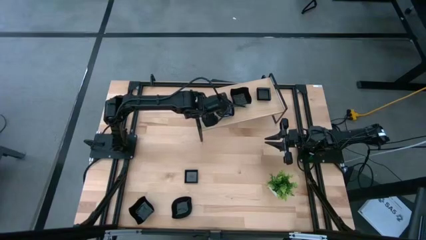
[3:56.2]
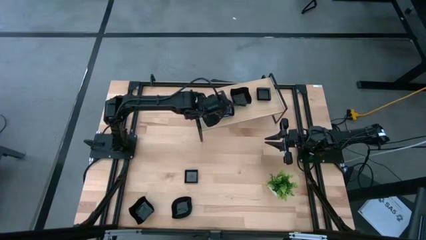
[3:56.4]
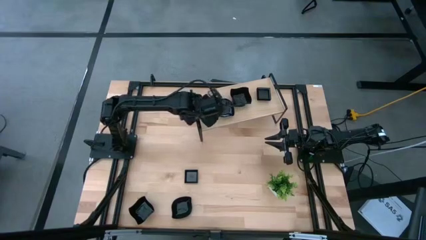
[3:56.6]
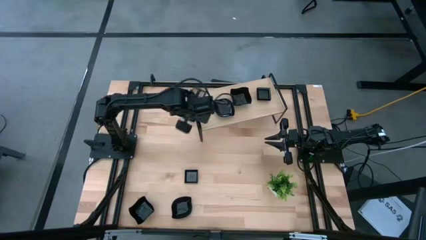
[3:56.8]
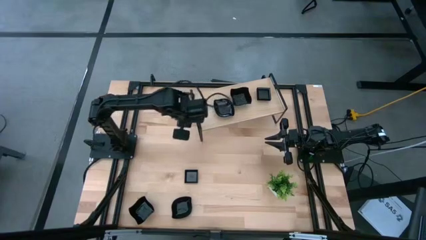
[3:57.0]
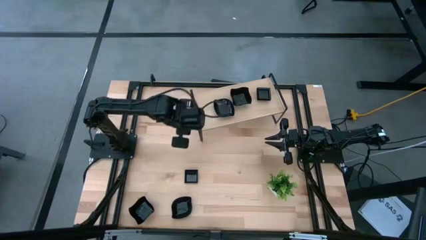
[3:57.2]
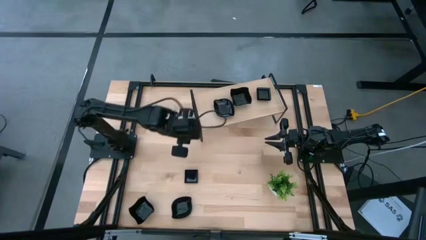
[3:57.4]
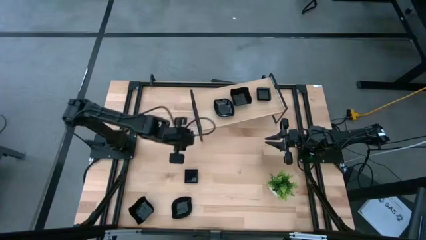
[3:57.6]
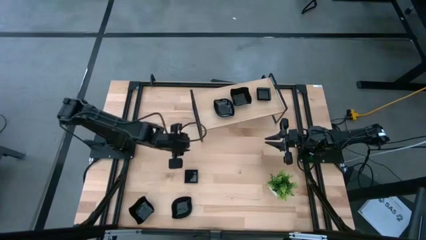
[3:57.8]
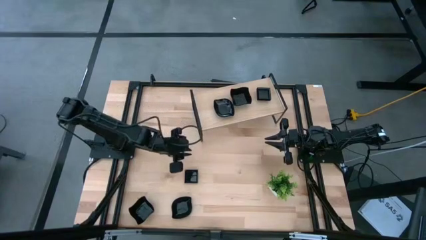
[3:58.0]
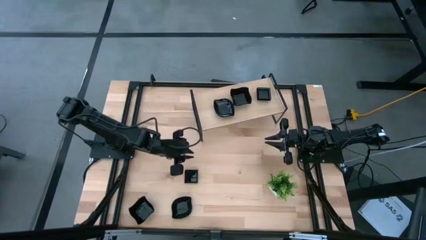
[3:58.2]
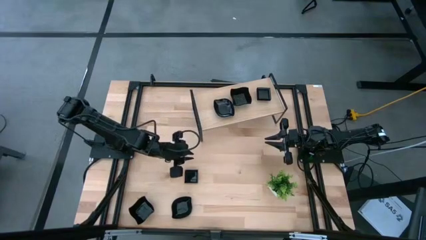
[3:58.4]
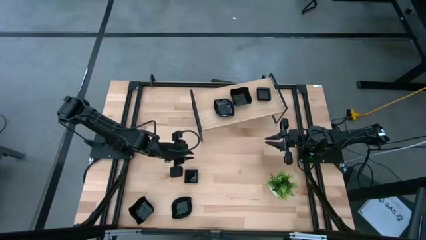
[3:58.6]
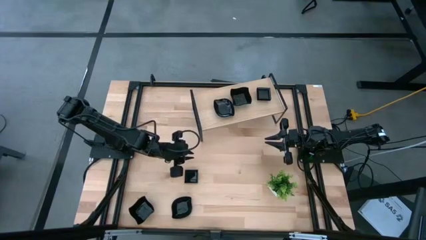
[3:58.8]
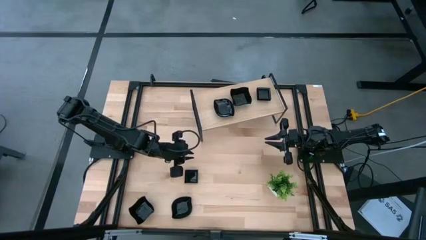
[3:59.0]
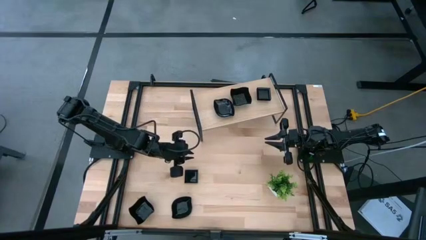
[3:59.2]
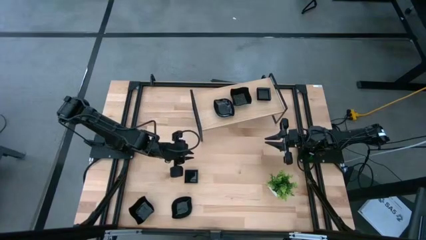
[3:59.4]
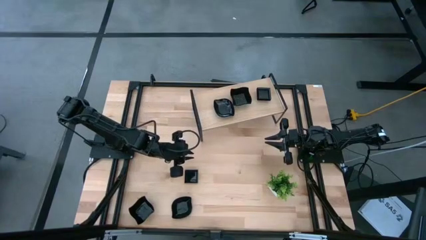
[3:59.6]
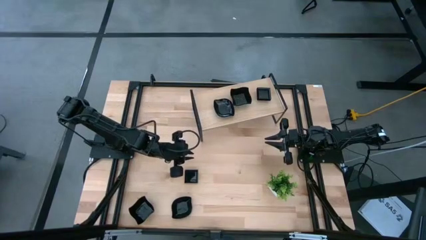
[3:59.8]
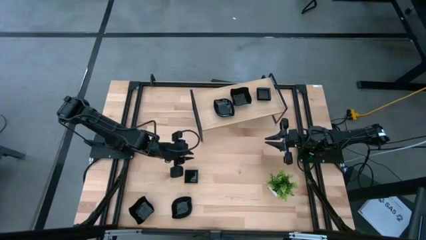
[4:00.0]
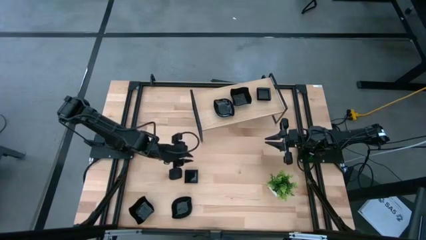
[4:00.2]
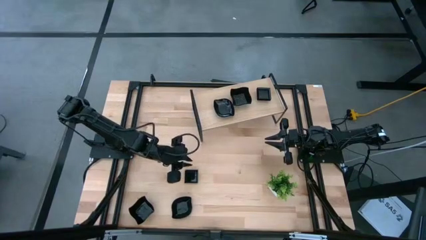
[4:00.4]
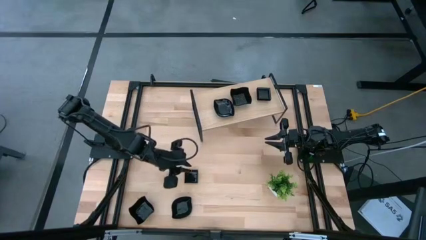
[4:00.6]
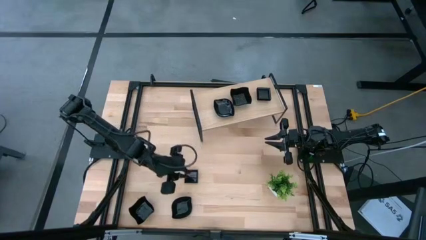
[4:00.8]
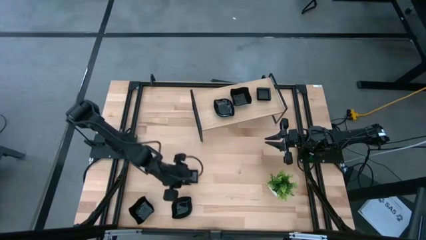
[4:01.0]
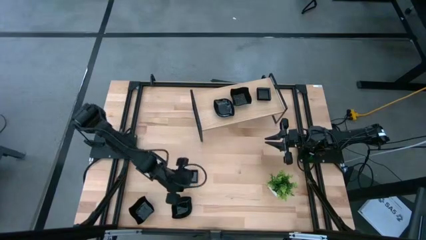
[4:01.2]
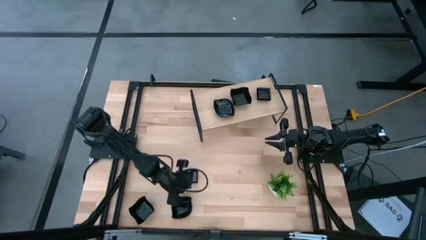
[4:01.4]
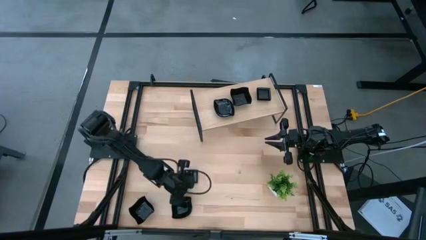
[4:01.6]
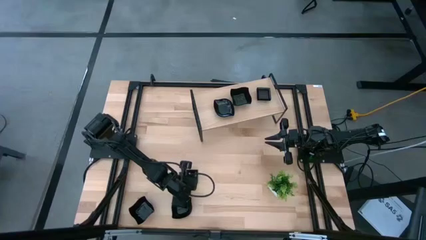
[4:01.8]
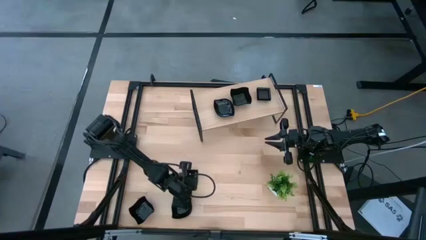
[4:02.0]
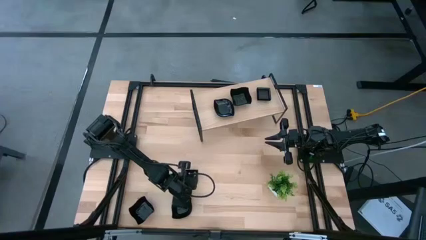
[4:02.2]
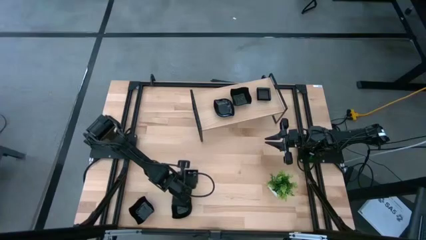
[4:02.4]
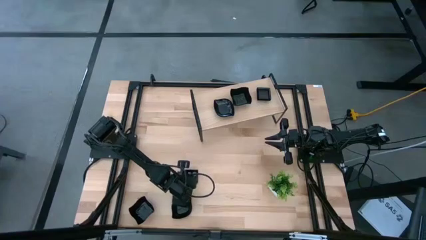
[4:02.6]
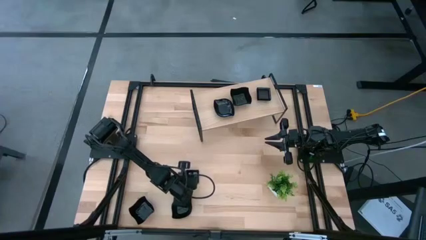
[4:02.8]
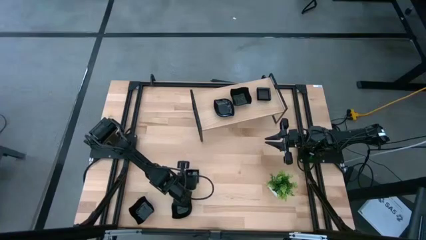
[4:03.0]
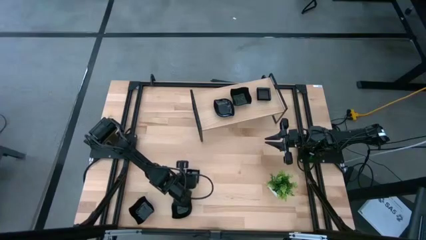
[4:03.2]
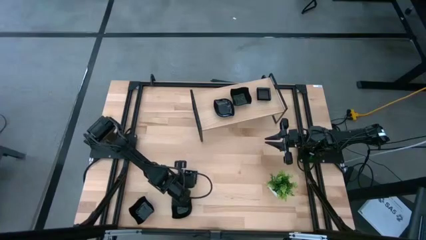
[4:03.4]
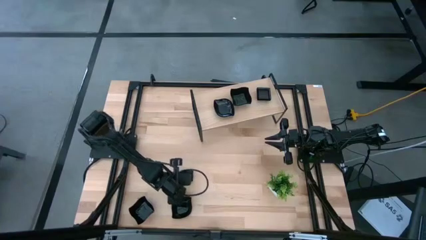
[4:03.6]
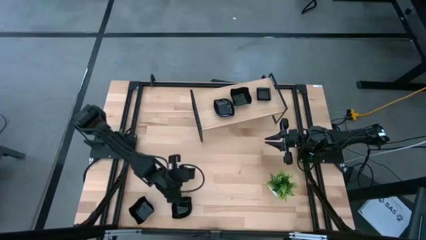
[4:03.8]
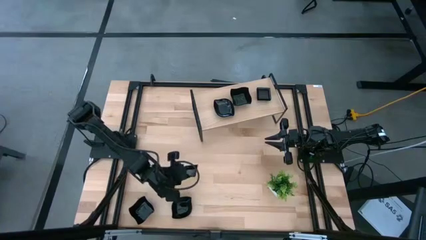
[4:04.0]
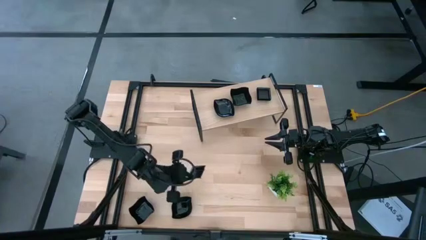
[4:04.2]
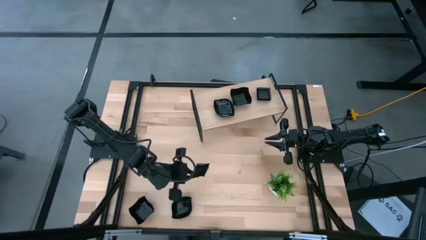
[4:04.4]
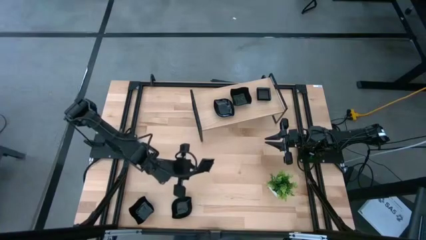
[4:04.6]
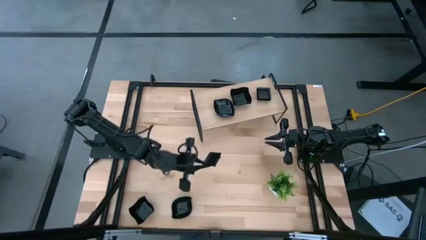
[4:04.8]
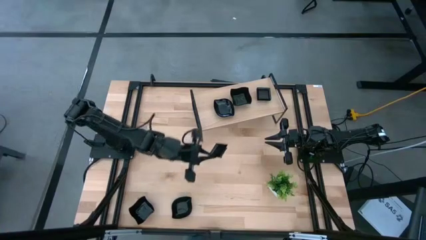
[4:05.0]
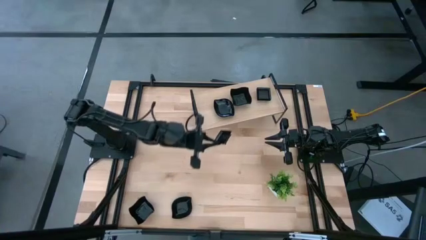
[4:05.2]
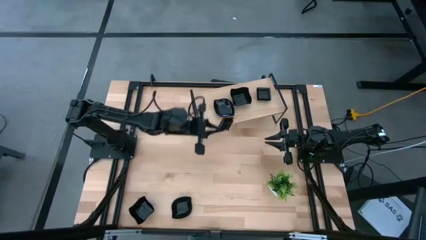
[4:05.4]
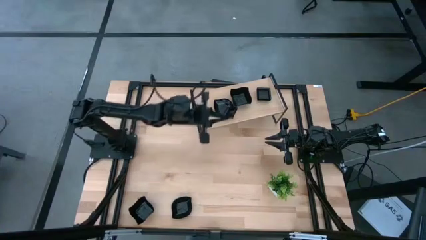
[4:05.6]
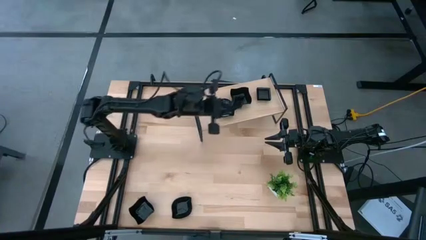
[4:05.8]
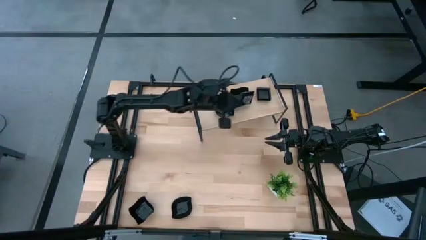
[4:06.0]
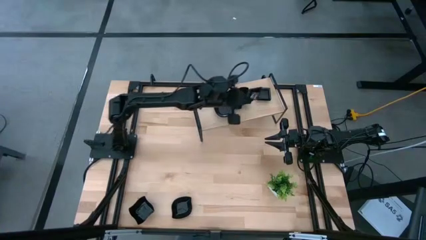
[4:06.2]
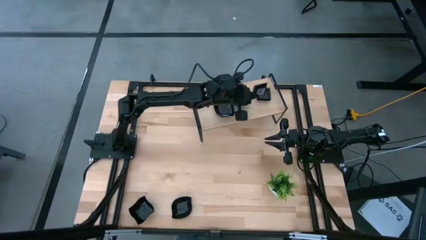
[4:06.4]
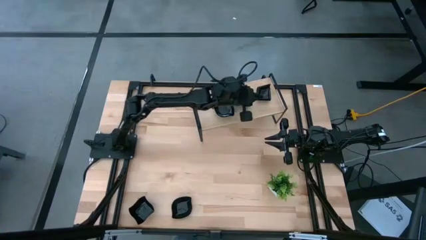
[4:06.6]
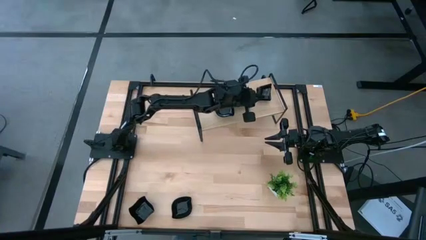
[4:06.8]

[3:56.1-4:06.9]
Task: Pick & Place Mini shaped plates
Stack the square plate on top of the square plate on the shelf

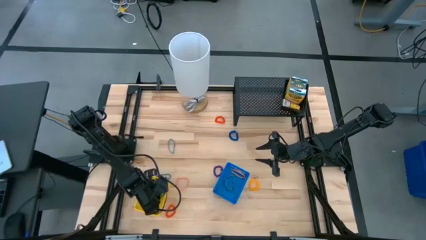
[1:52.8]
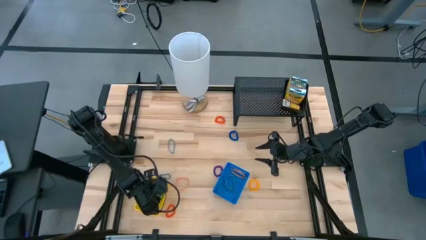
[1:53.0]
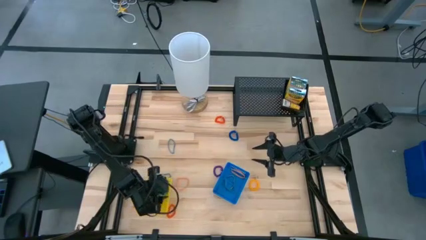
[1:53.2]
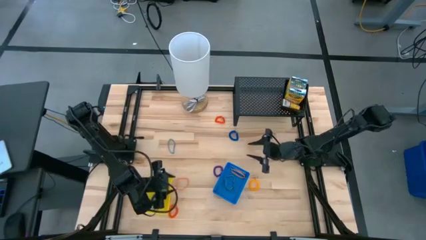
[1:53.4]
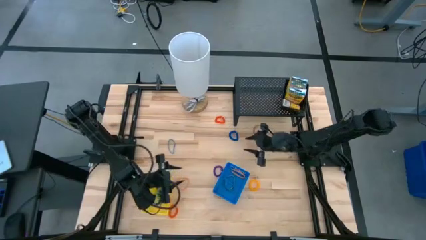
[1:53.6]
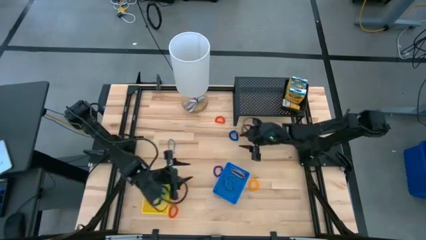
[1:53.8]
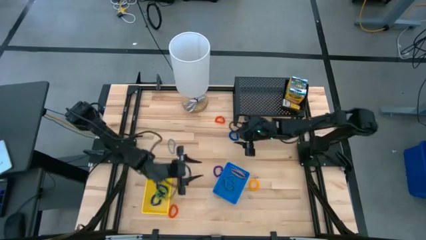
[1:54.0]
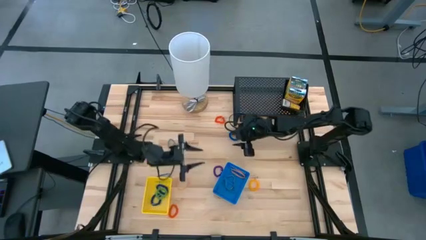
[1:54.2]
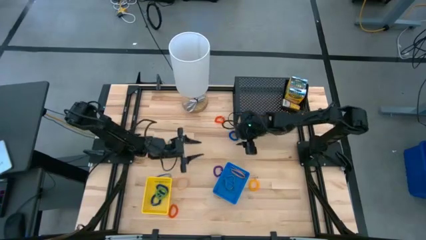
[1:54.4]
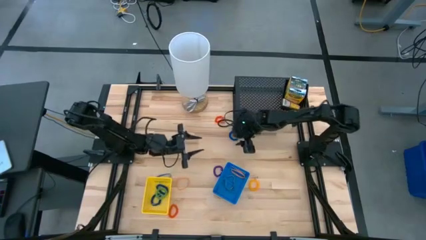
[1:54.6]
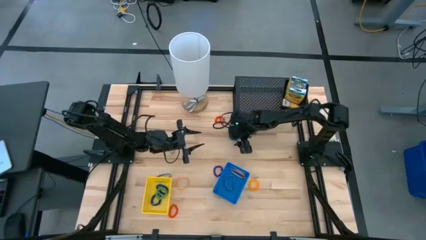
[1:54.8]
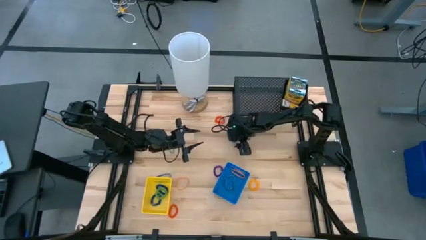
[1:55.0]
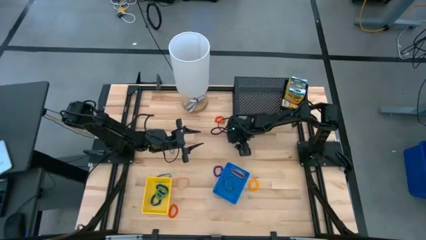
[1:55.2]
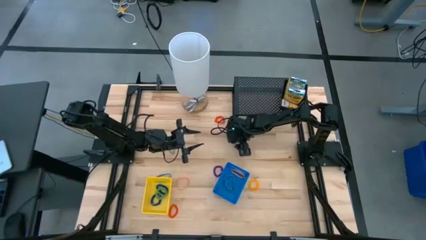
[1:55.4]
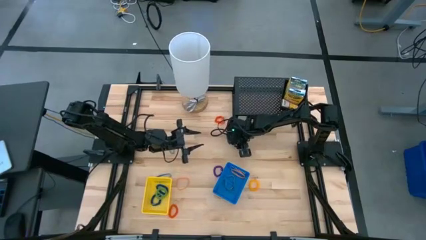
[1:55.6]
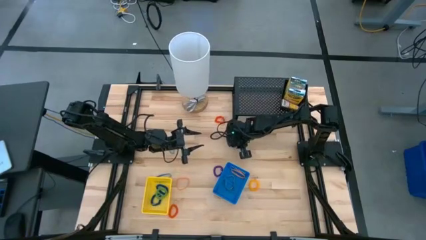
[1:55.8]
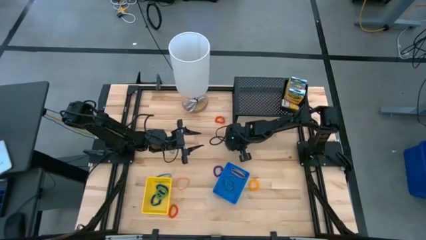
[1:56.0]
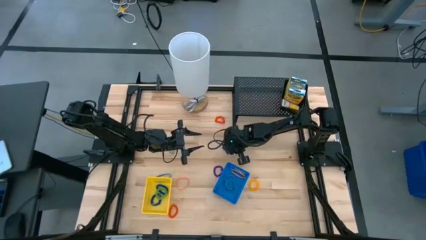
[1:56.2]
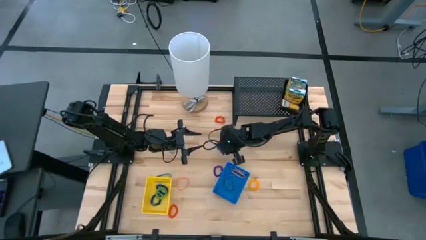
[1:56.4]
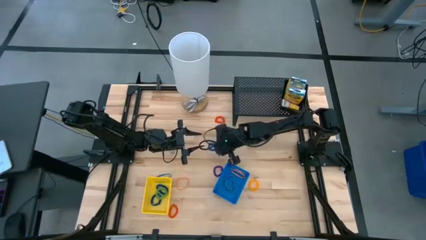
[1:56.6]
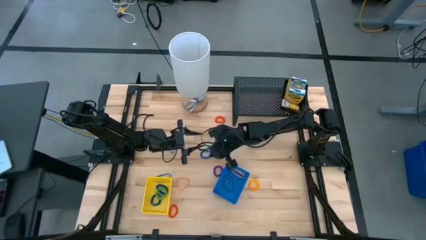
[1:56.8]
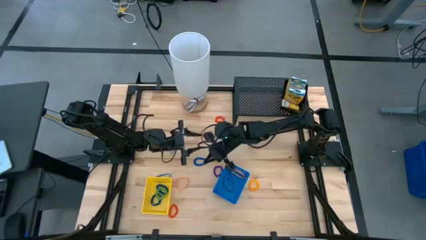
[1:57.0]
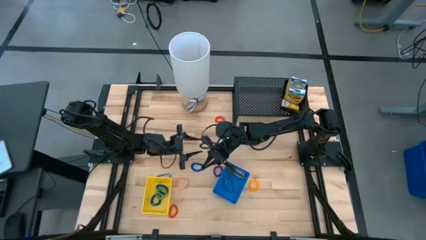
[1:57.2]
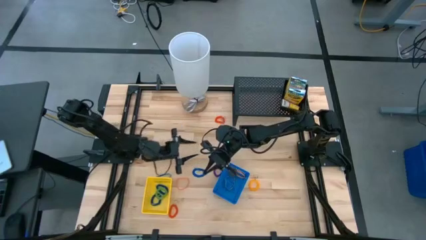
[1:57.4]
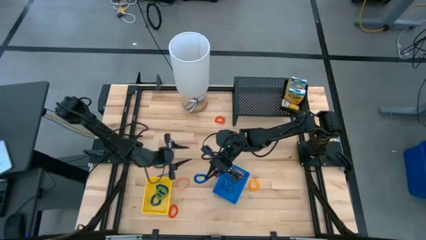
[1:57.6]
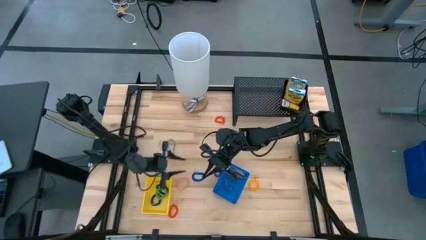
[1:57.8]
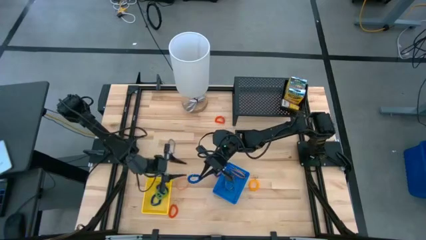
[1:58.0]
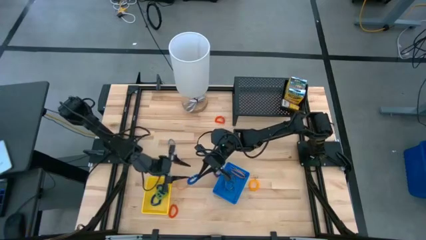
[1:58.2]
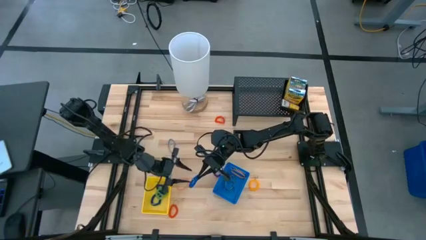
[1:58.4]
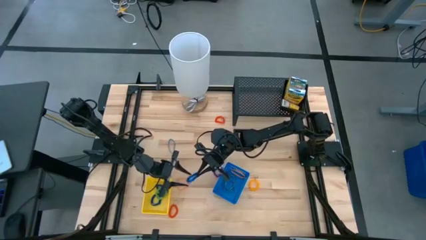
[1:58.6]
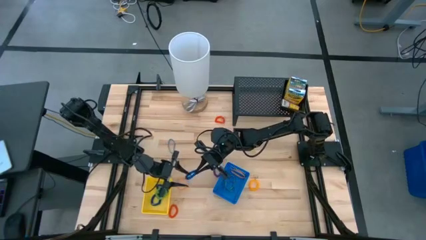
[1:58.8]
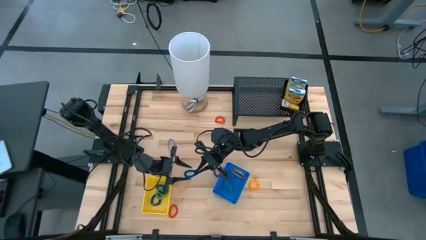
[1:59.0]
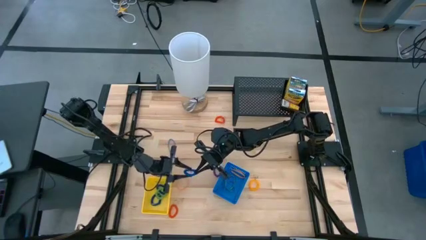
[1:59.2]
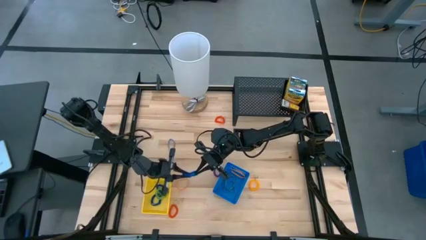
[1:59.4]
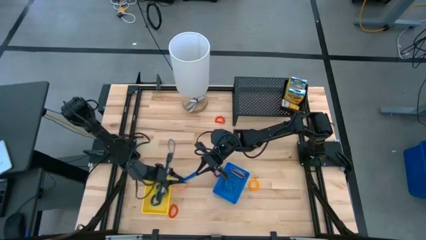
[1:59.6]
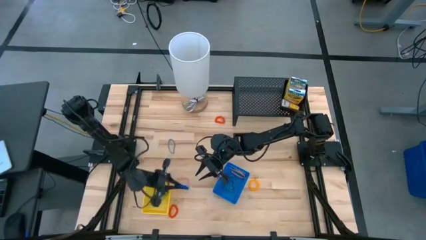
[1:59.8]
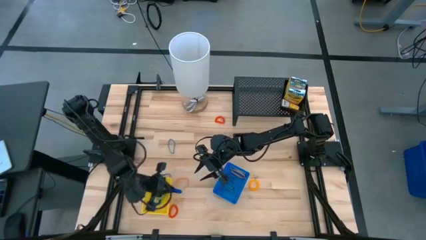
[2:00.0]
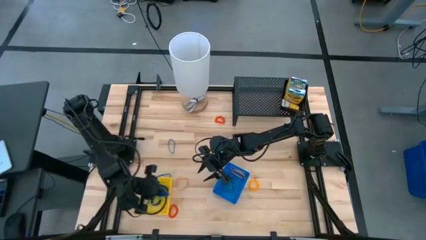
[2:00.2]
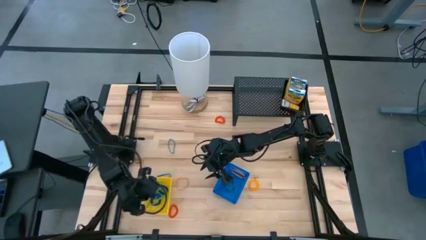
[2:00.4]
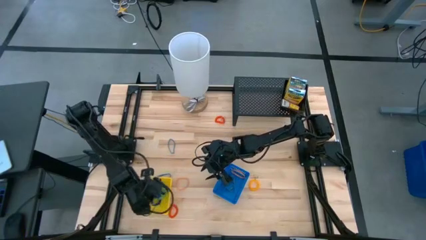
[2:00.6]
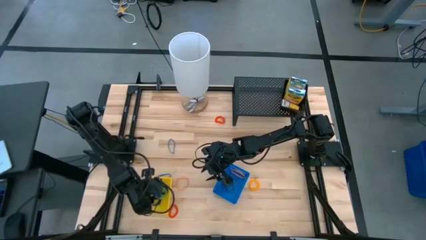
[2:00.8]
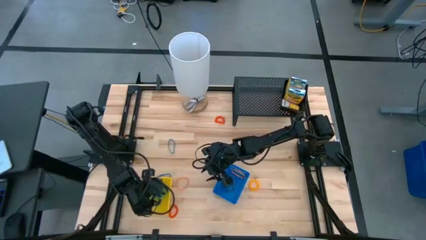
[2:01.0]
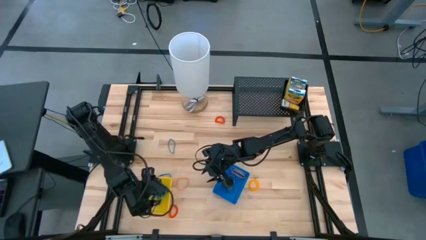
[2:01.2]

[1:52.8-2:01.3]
Task: Pick & Place Office Desk Supplies
Put the blue spring keychain into the yellow bin
